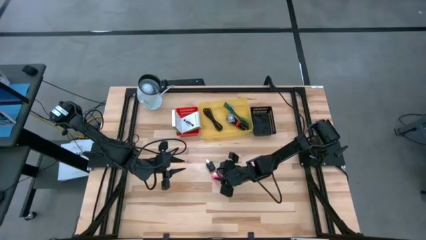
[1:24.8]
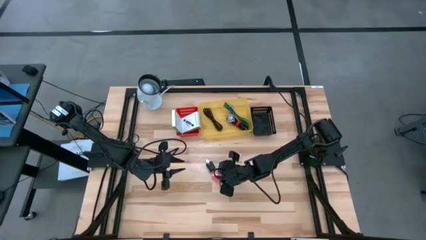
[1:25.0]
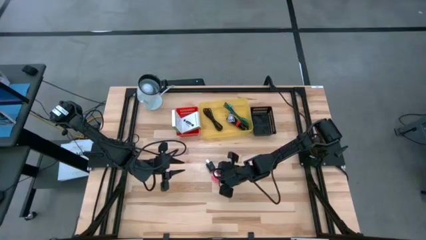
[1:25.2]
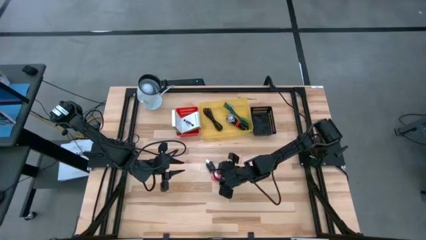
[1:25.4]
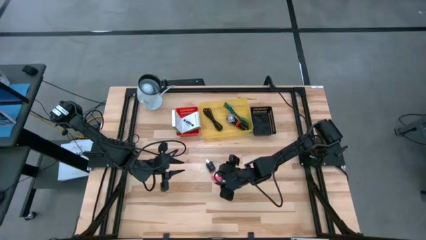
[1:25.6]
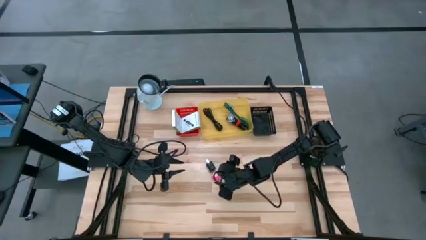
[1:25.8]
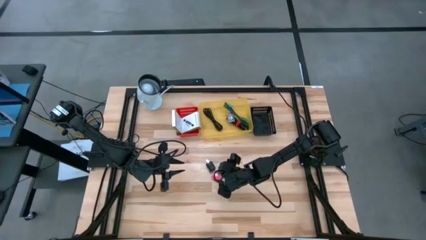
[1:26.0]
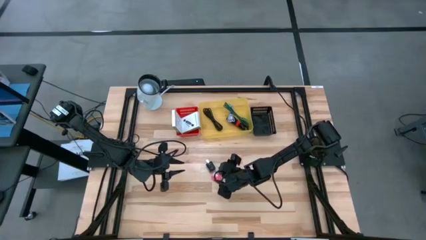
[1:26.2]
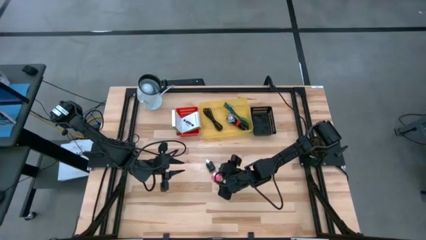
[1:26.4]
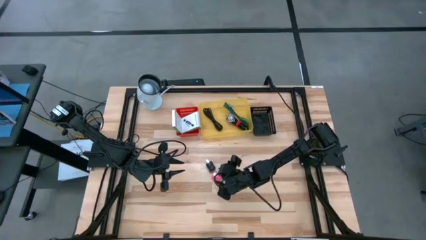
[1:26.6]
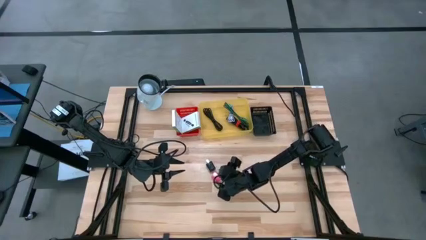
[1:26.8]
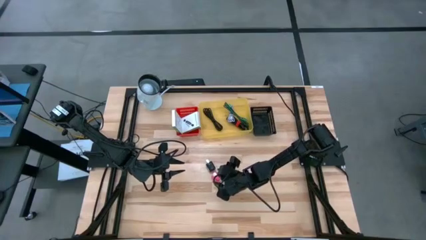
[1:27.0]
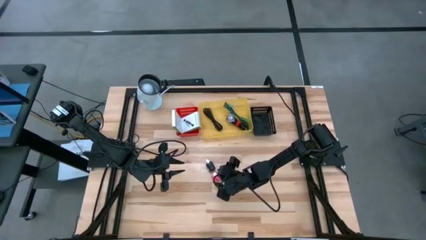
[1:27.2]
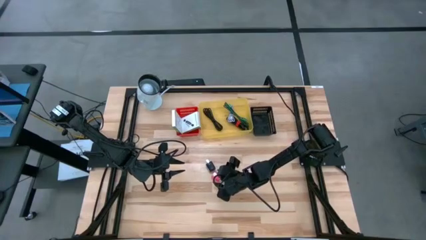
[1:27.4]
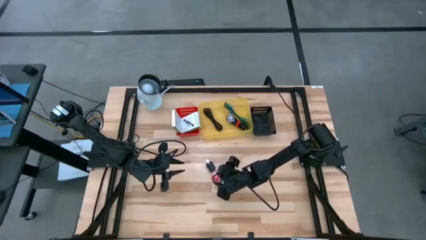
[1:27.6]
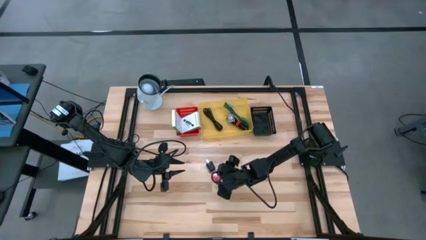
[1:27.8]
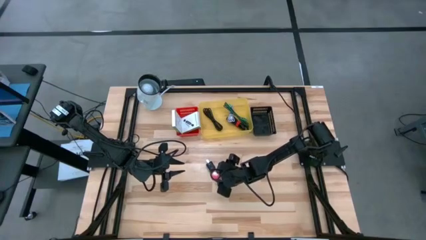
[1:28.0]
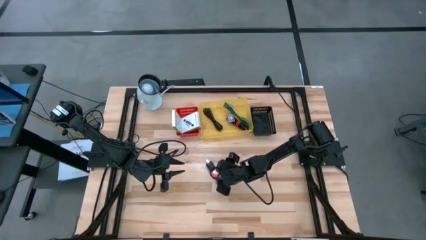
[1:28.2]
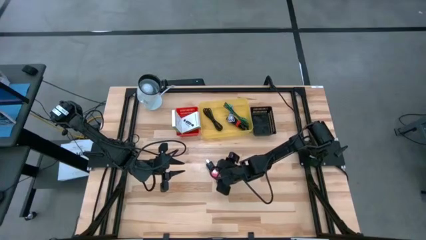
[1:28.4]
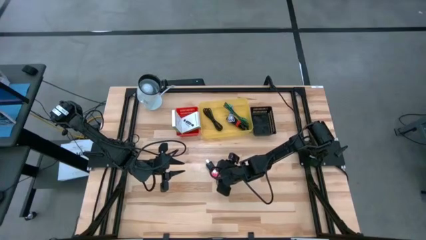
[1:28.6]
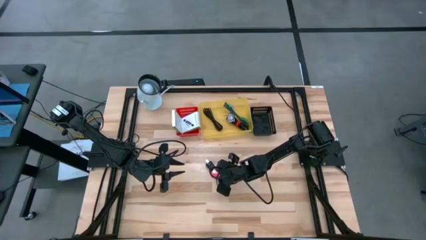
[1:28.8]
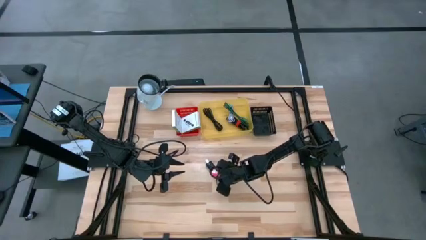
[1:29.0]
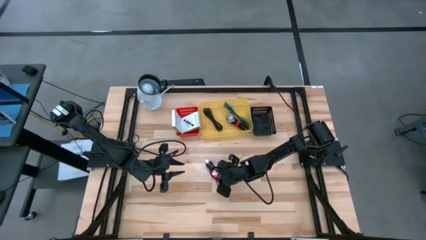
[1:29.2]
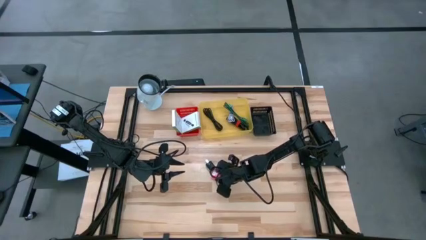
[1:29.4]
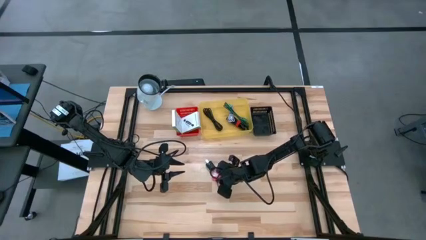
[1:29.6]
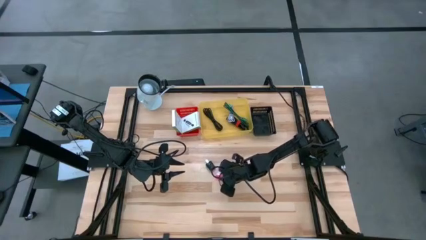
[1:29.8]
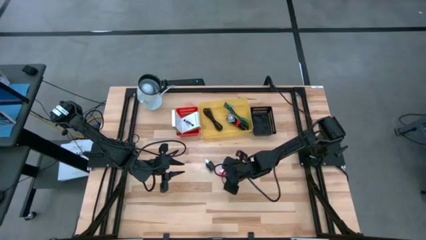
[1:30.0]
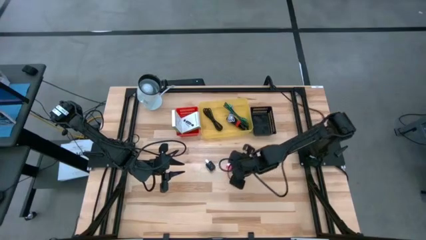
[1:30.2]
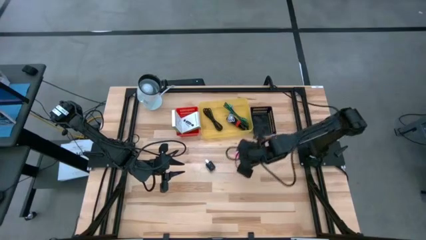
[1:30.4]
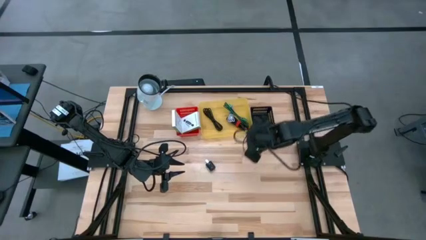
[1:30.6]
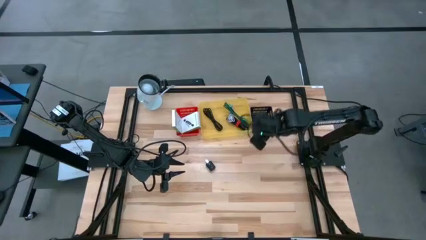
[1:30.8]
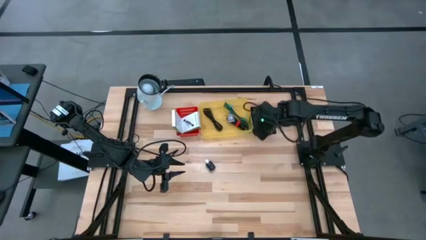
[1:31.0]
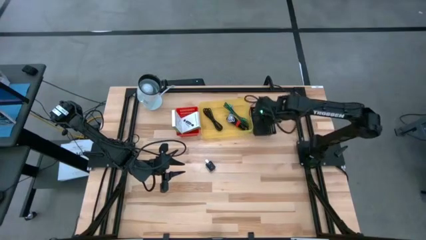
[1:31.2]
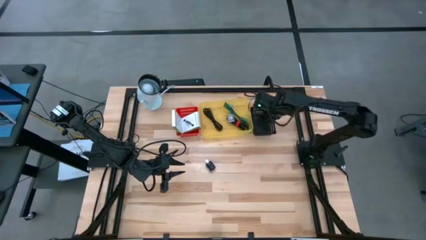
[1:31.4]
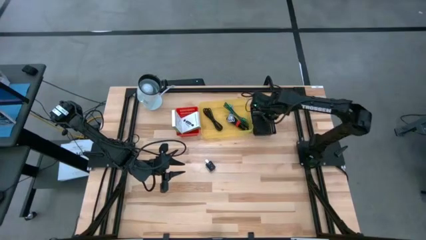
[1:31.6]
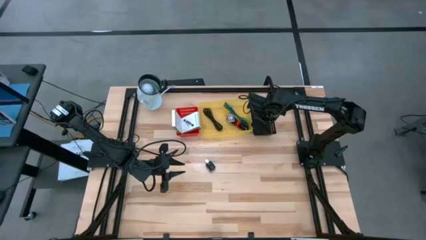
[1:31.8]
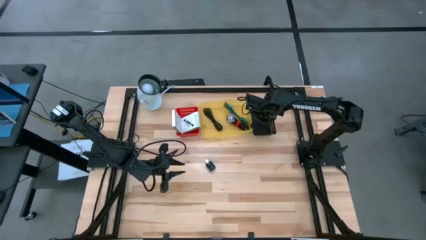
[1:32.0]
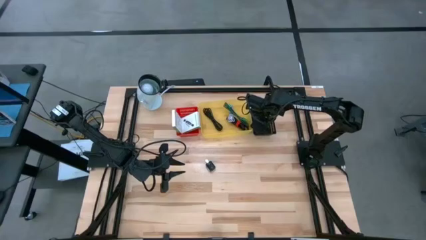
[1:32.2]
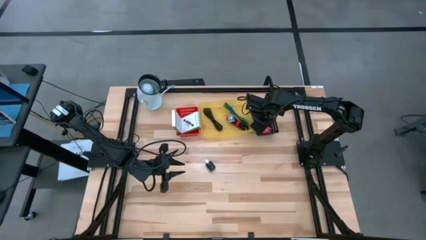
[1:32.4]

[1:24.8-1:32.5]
Task: Pick and place items into bin
Put the pink charger adapter into the black bin

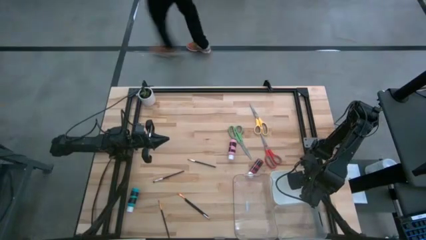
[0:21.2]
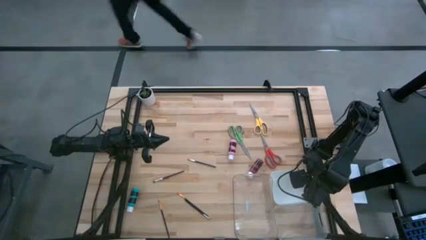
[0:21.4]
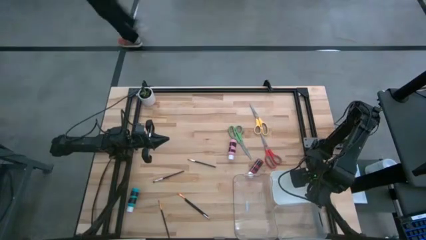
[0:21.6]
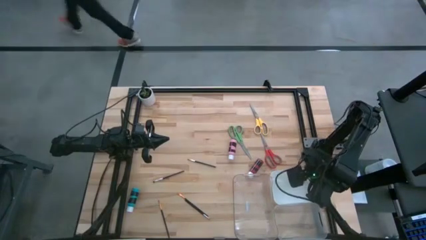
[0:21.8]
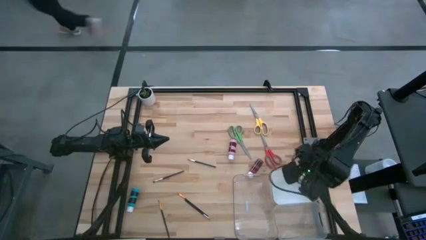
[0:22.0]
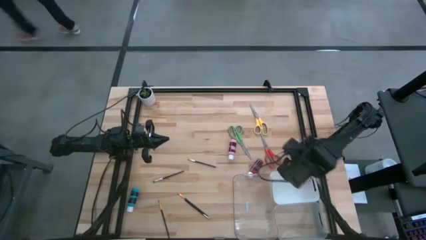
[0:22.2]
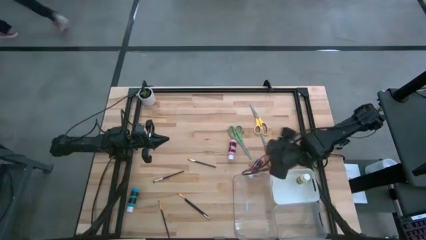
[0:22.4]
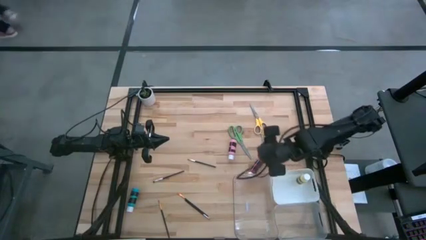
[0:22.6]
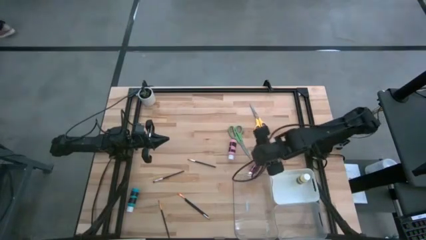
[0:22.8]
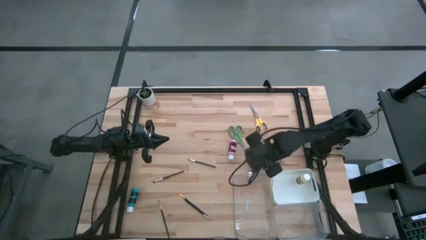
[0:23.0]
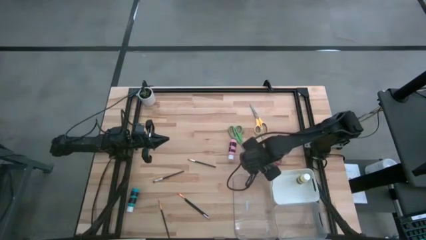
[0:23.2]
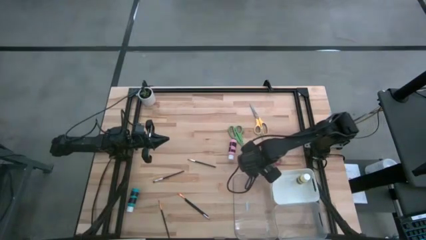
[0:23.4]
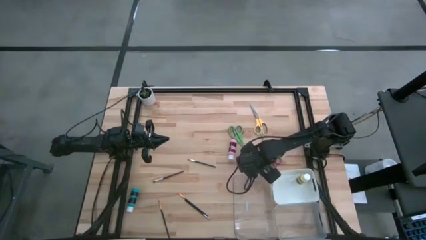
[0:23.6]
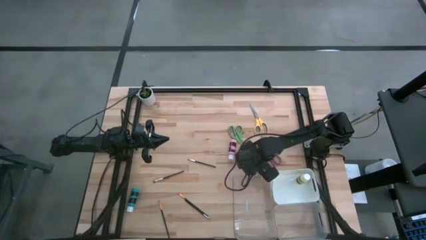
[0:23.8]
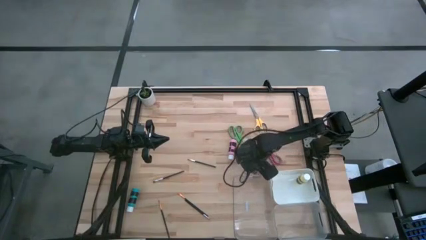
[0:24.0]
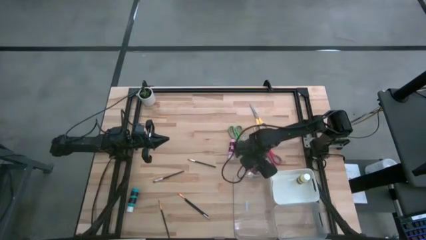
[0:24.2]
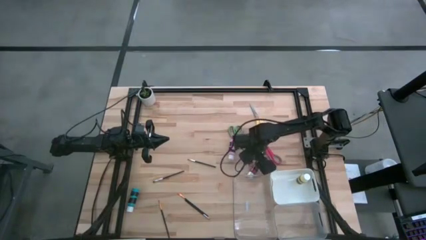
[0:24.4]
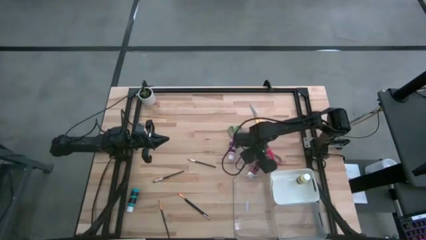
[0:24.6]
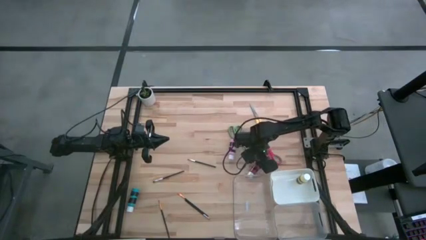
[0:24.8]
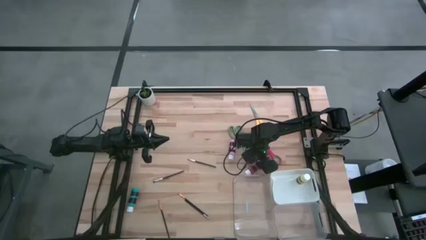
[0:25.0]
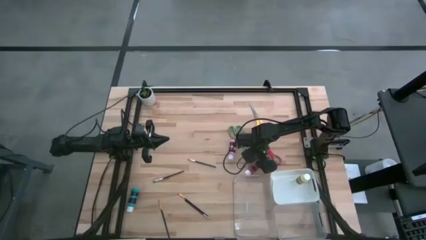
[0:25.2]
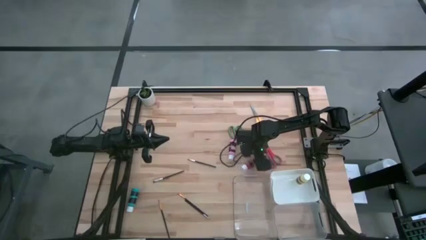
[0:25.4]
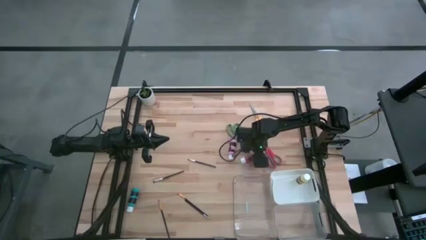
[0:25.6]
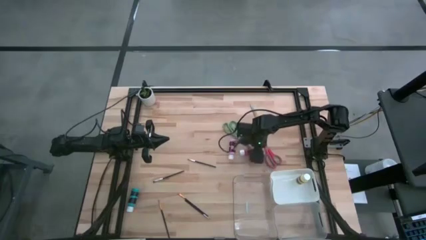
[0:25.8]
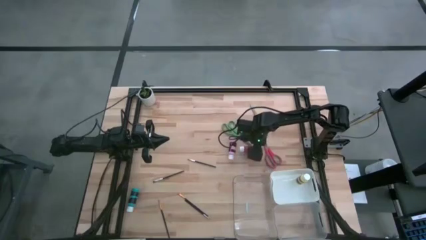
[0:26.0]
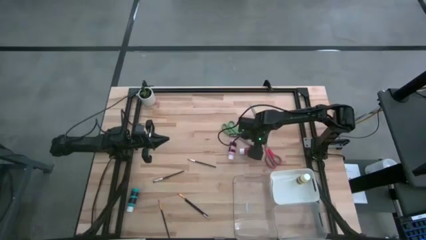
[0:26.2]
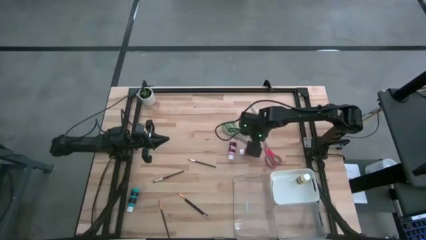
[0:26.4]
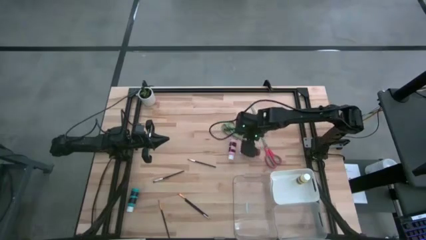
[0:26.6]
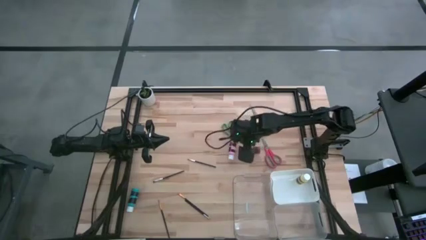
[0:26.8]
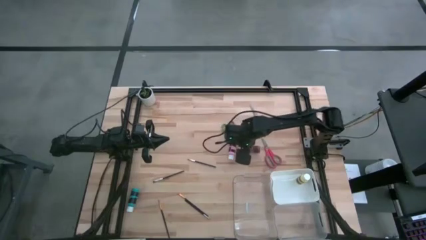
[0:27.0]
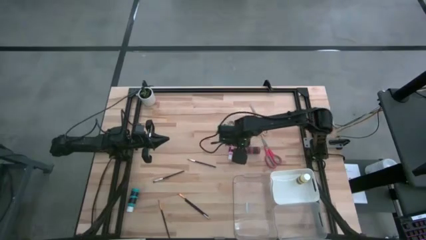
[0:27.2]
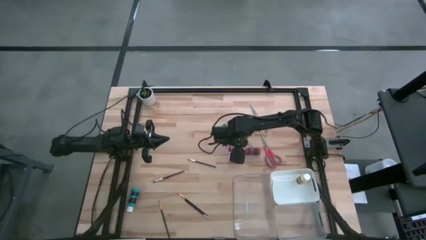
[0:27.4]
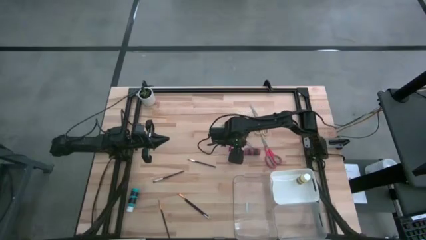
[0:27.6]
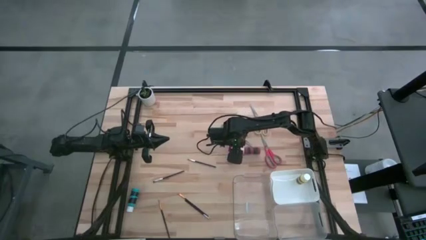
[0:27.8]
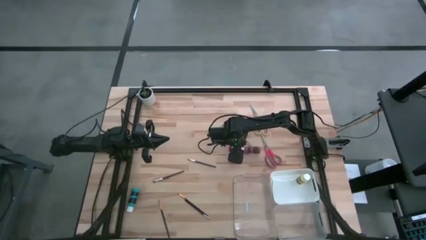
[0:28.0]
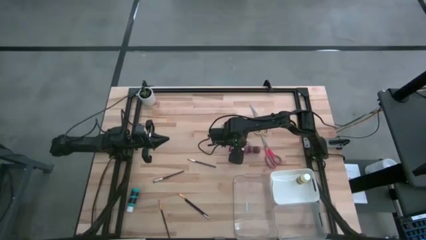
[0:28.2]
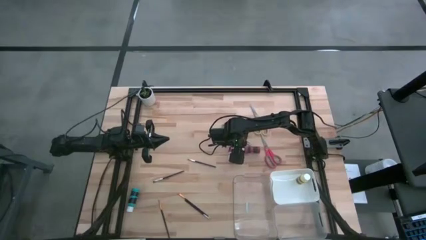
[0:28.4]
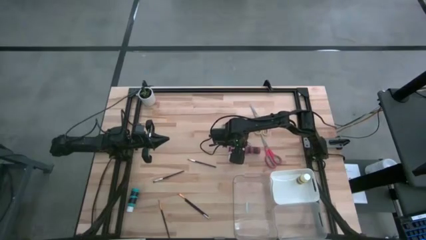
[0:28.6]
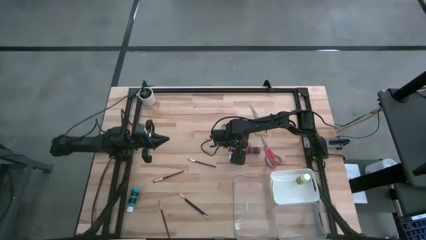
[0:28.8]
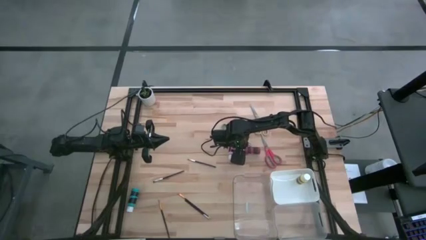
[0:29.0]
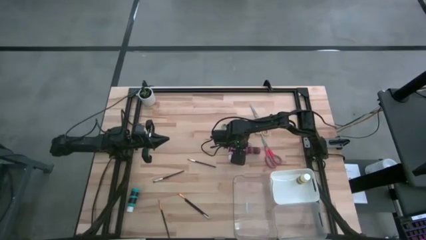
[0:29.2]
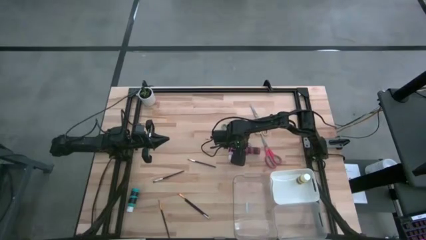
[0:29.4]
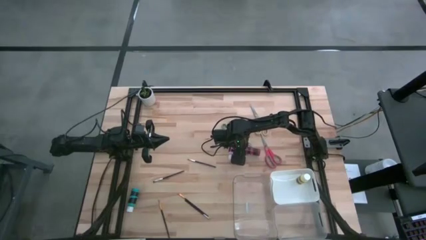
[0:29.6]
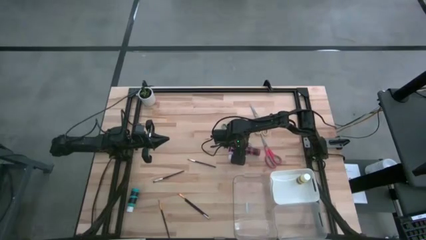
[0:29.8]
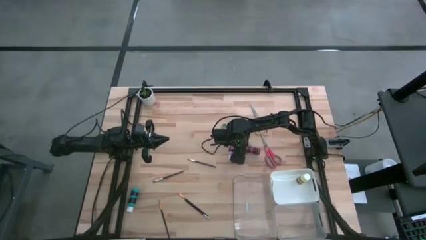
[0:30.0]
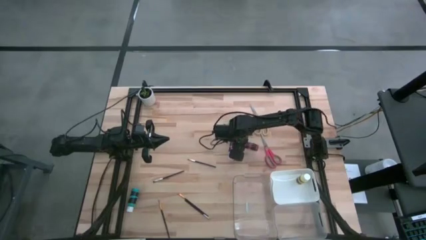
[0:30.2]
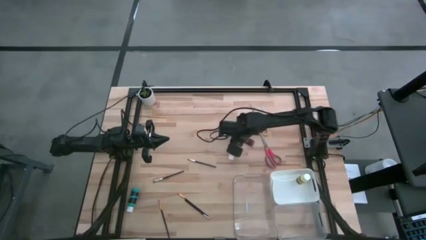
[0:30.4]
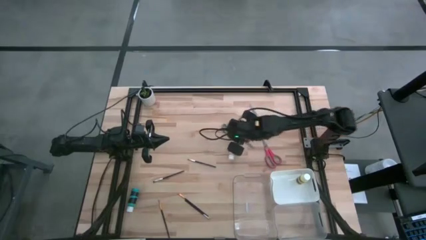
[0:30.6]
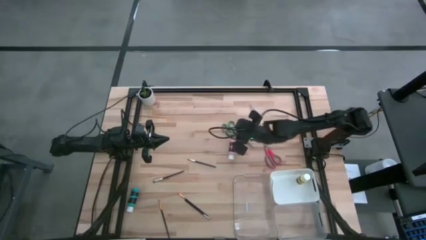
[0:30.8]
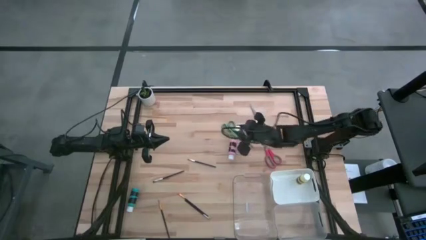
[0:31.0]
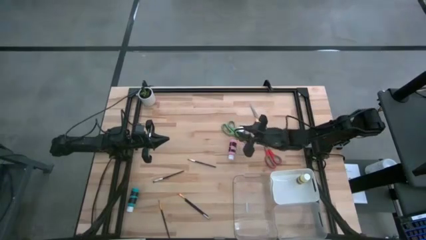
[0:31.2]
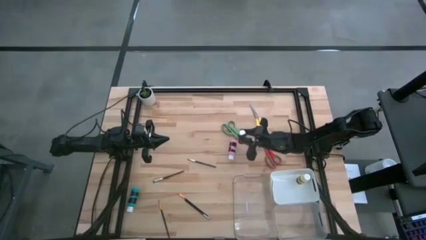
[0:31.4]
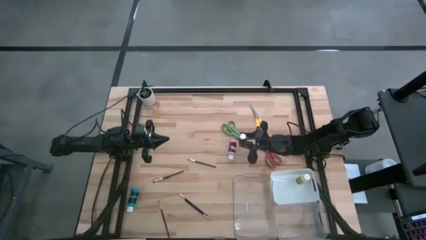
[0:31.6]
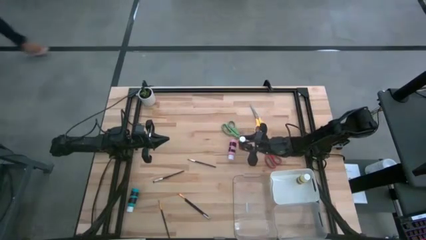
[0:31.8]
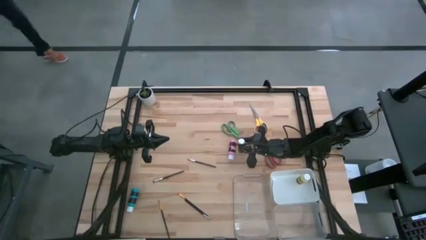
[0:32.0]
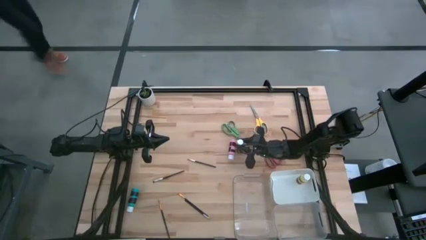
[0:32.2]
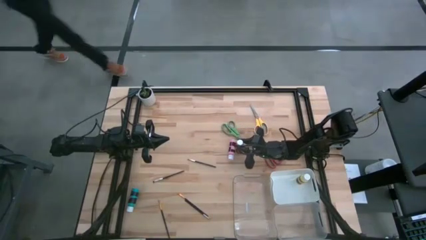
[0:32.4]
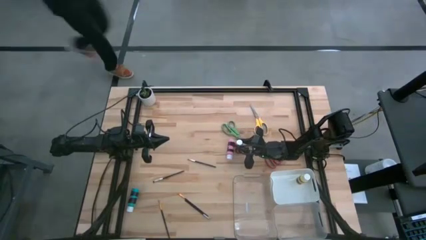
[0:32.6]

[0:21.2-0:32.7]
Task: Pick & Place Paint Supplies
Put the red paint bottle into the white bin
